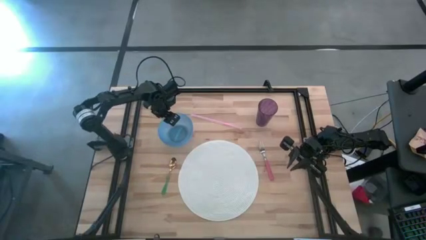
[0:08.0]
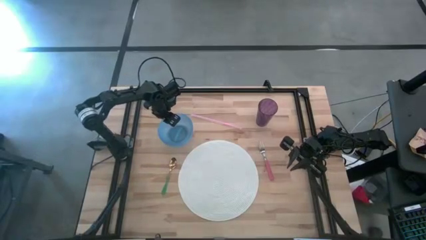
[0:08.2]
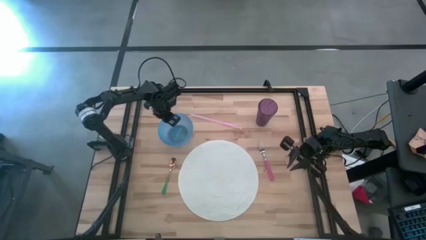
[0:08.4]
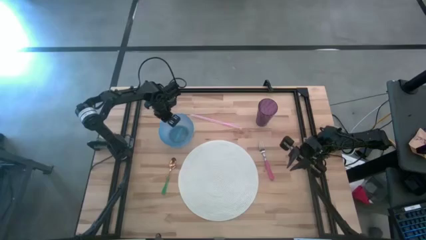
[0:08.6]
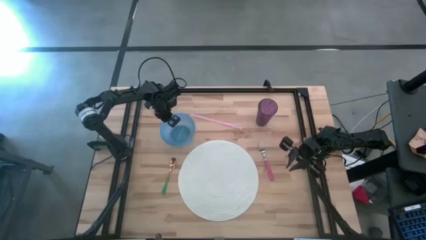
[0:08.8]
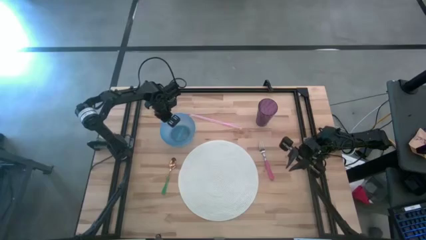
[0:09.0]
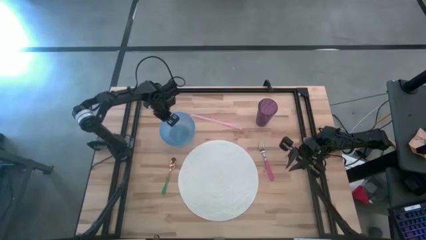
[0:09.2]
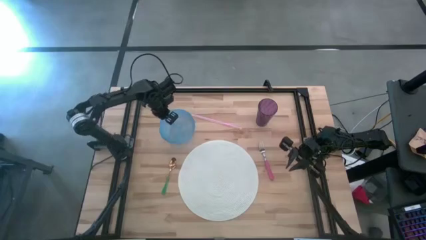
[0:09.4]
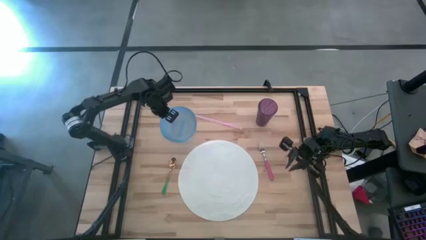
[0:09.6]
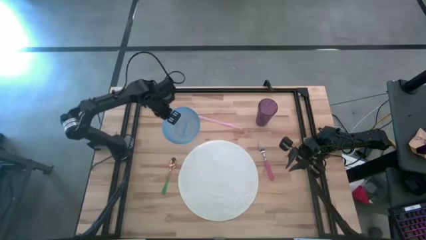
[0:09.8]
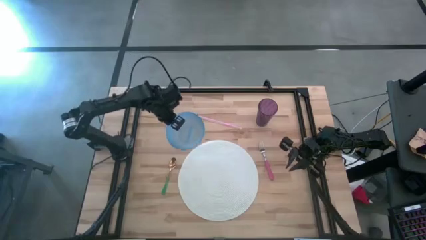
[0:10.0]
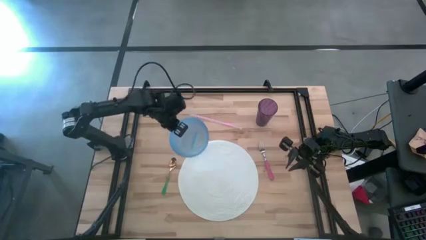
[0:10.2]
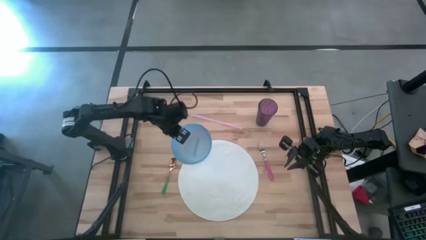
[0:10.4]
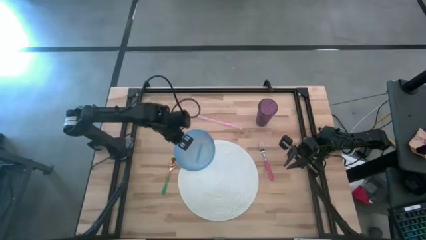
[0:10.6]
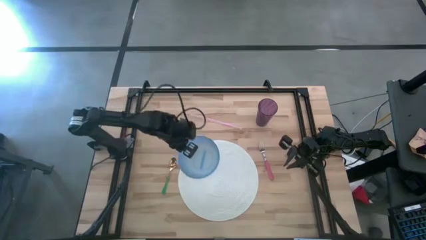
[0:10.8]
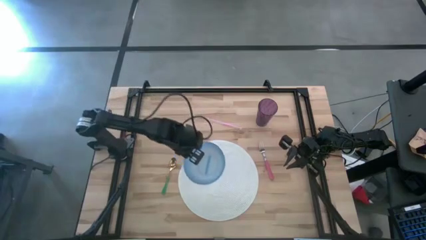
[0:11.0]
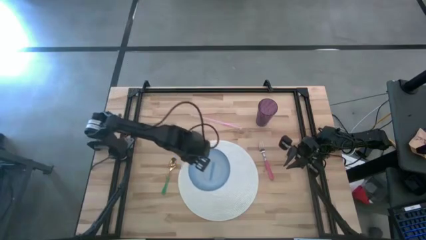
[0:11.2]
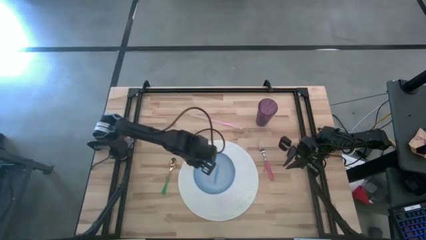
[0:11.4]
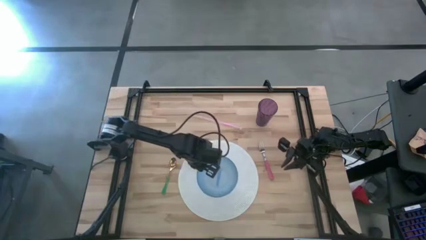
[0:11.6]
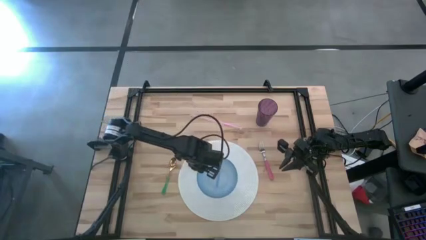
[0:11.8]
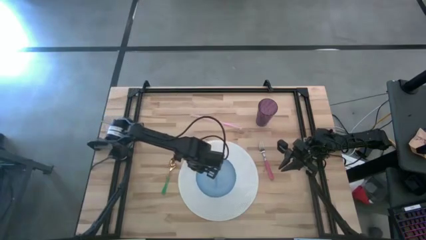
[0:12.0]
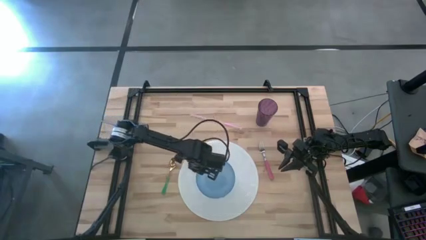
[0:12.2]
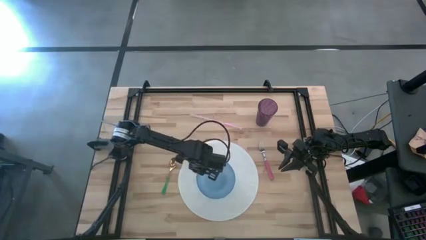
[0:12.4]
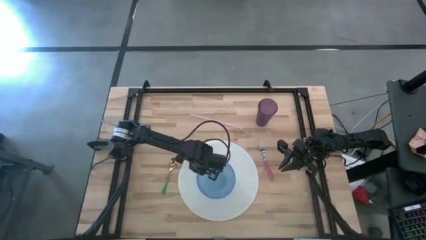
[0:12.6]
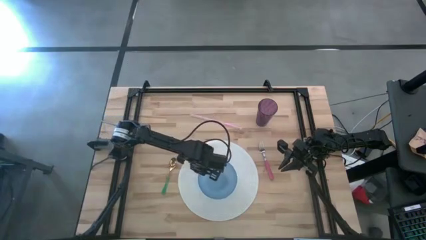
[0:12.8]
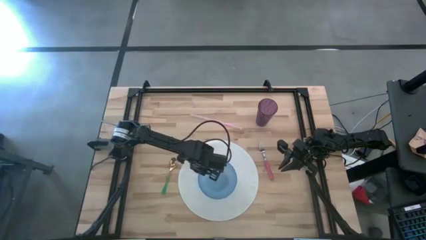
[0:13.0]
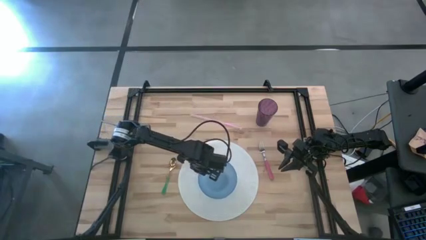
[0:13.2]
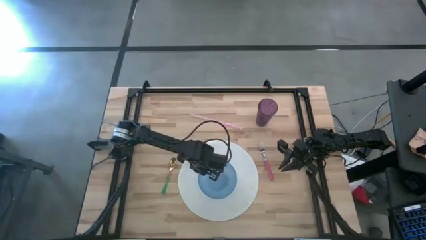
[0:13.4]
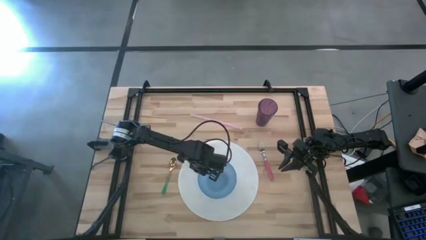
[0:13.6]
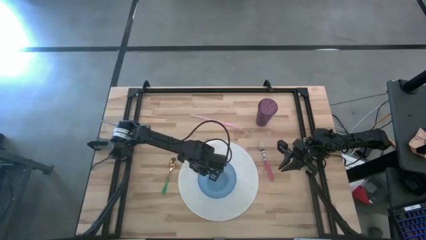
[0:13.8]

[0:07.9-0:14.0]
Task: Pick & Place Utensil
Put the blue bowl on the center of the white placemat

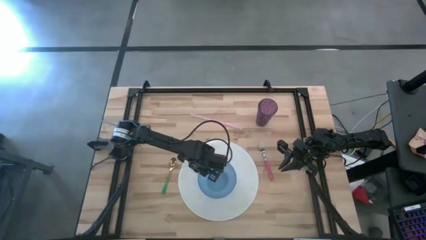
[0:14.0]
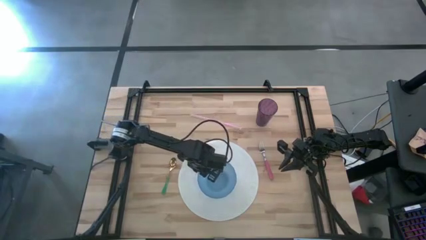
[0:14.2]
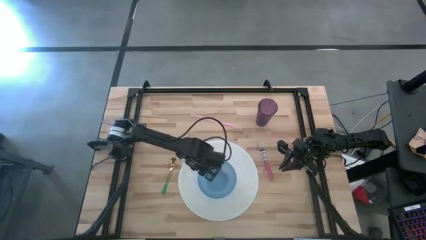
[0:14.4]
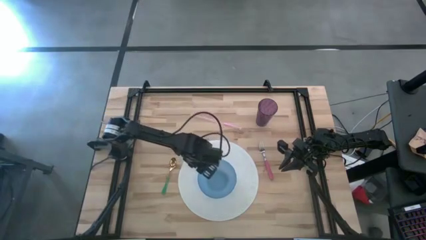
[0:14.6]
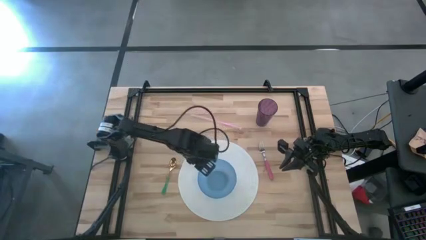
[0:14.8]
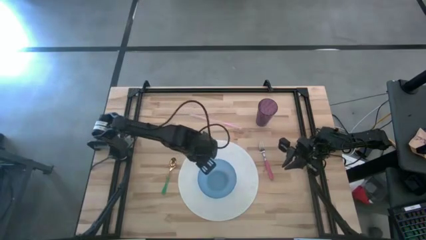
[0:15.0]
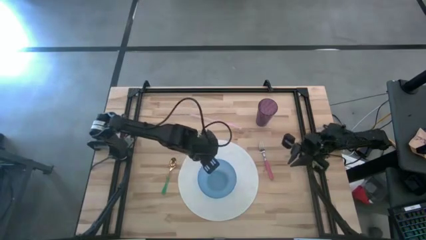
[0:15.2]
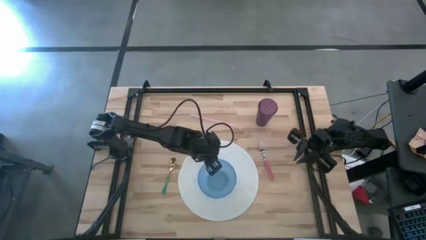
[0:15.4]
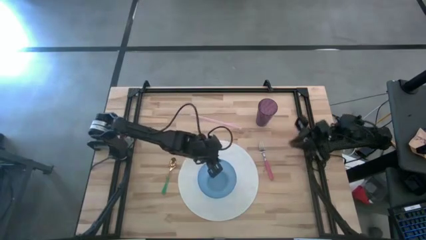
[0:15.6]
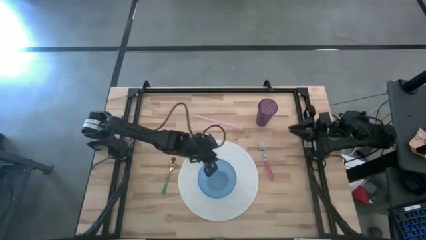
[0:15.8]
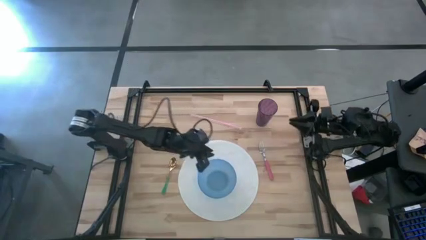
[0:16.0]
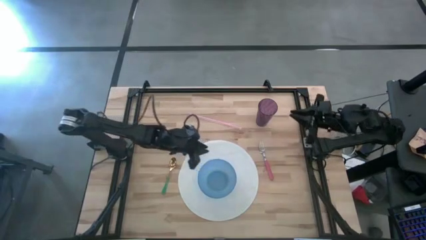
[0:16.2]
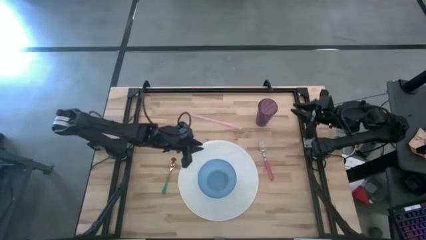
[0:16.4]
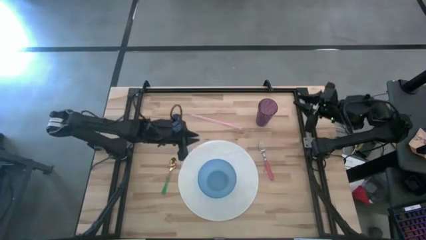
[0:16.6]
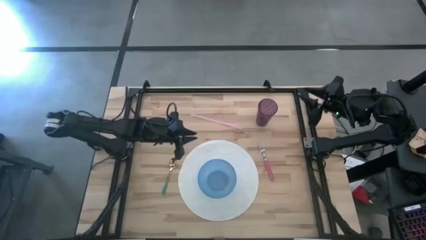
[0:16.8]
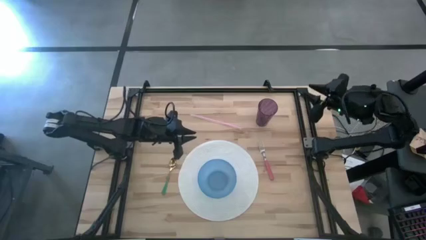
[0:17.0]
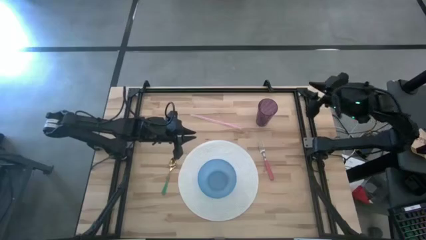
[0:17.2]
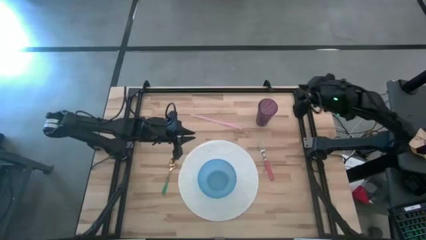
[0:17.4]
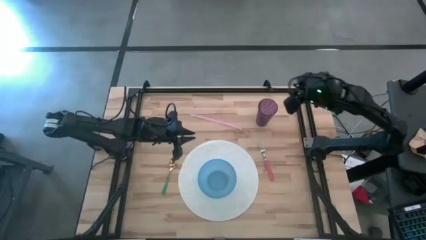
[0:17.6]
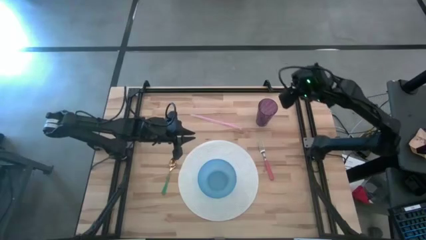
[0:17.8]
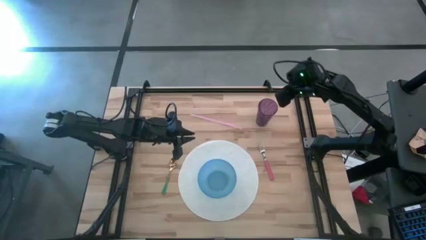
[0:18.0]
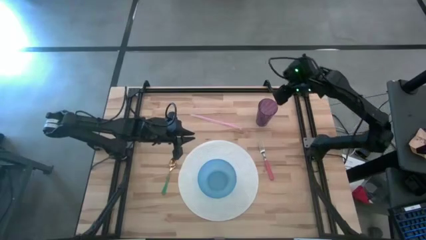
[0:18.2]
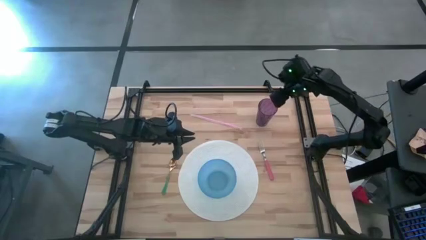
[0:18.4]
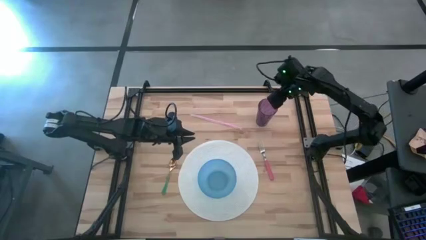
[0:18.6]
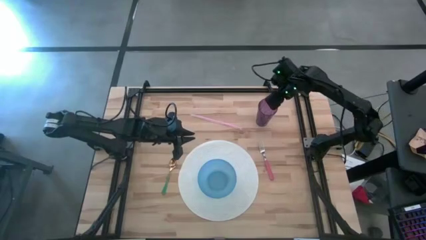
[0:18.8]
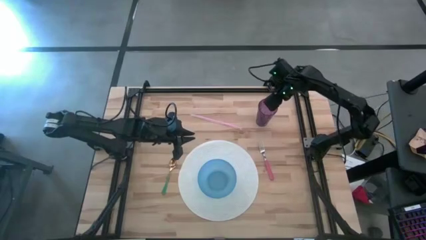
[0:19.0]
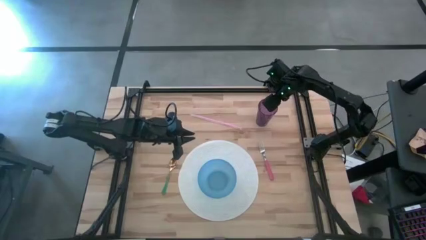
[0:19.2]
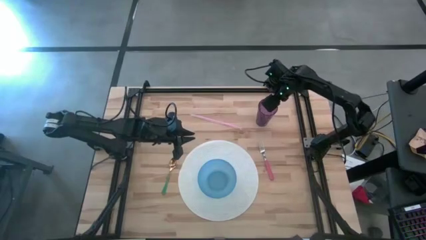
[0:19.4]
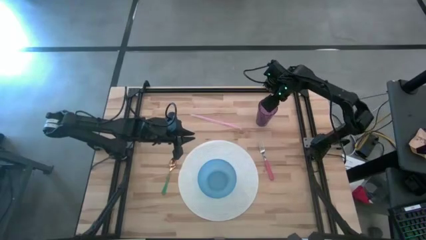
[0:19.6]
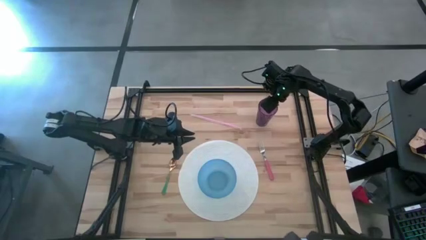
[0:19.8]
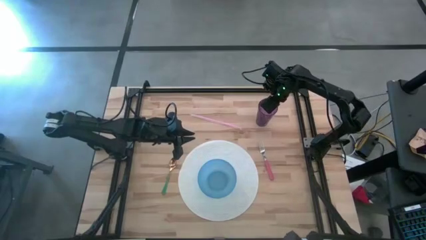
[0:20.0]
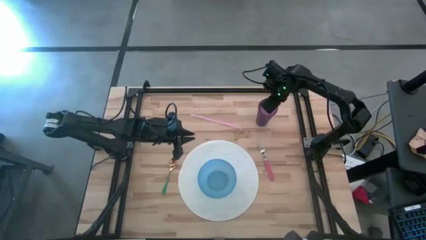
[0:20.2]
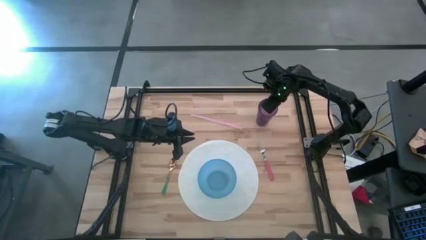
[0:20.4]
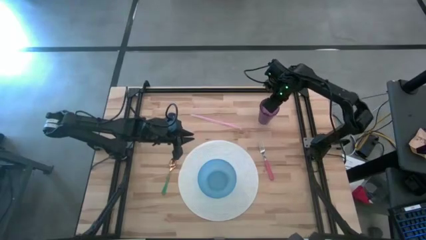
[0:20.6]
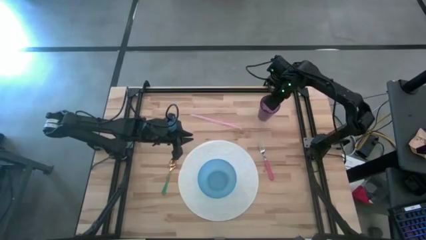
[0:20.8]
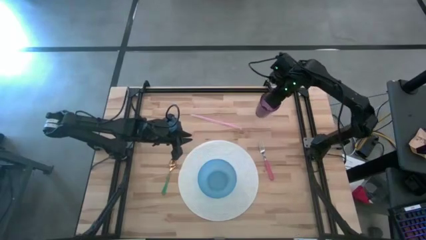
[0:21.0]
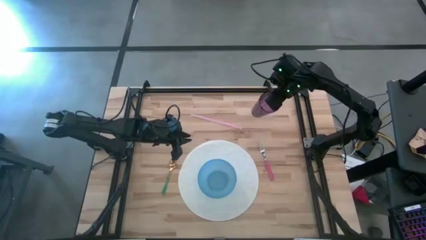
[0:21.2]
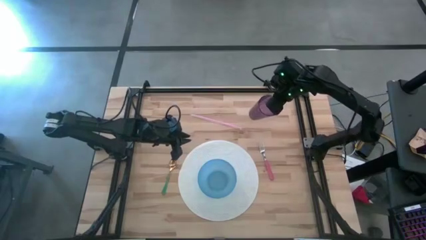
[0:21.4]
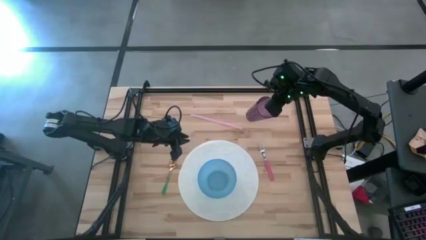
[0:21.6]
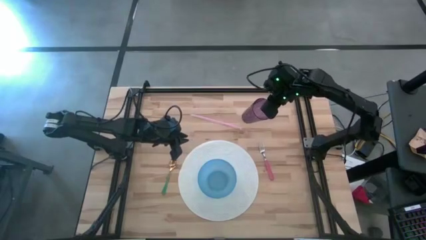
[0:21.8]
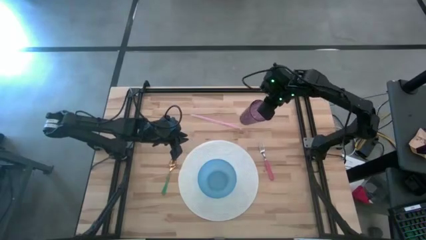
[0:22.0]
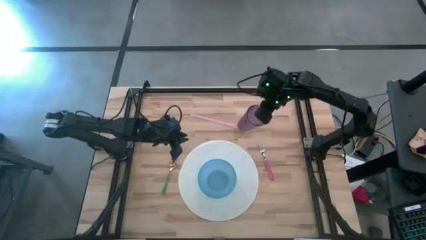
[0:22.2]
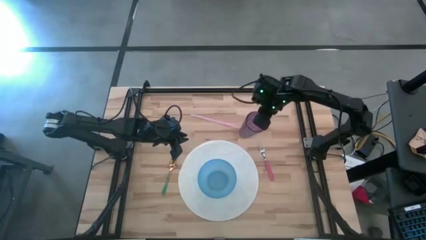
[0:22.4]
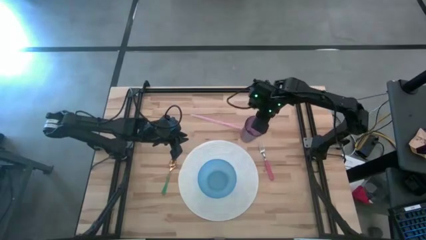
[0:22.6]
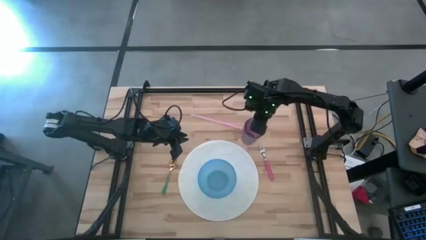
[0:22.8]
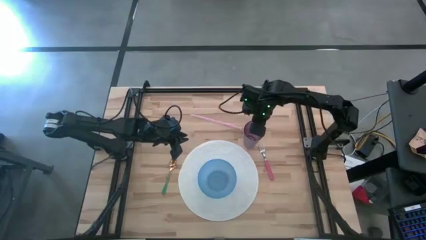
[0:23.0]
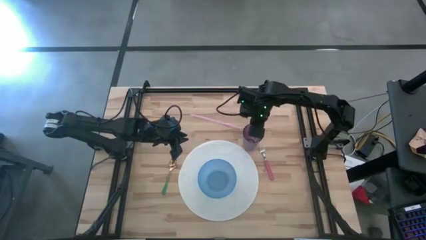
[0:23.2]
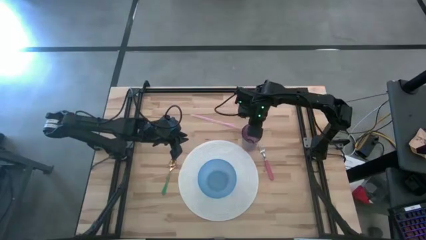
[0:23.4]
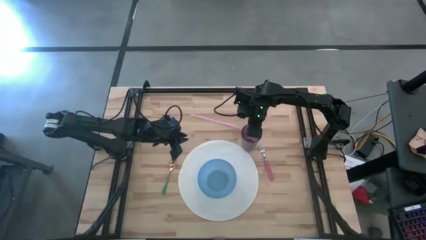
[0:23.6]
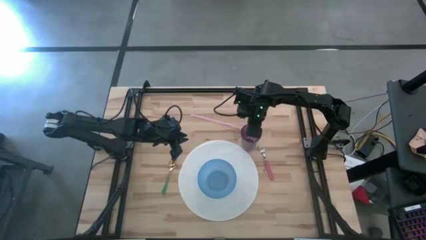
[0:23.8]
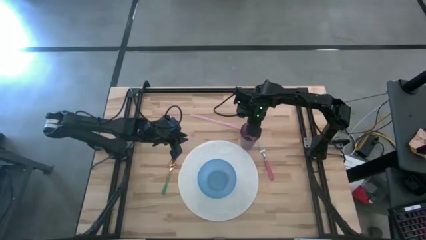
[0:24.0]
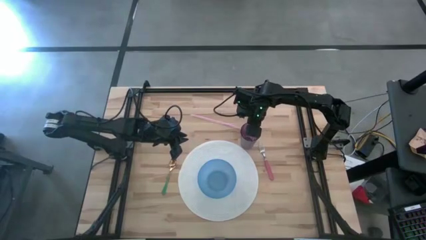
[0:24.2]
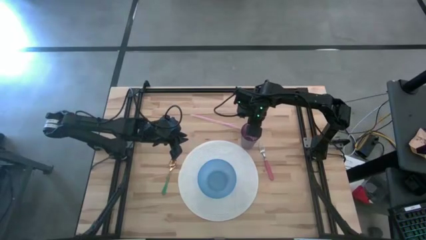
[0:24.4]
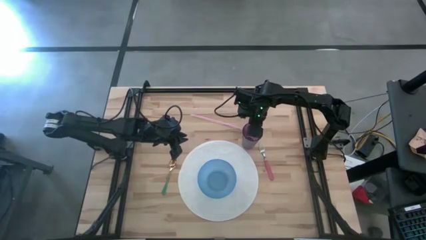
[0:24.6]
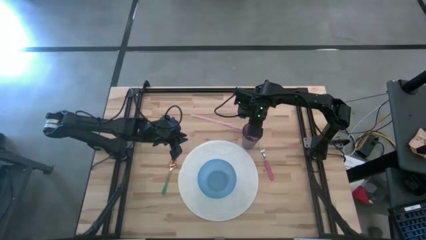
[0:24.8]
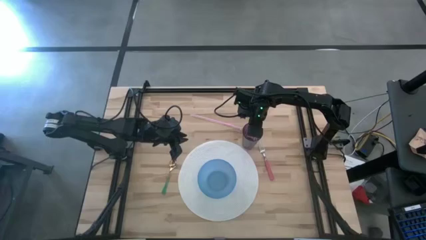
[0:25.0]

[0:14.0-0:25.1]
Put the purple cup on the top right side of the white placemat
